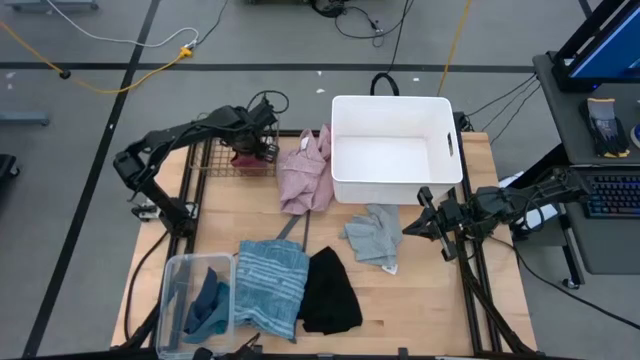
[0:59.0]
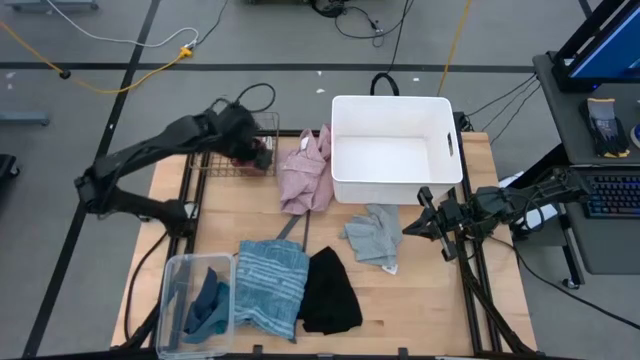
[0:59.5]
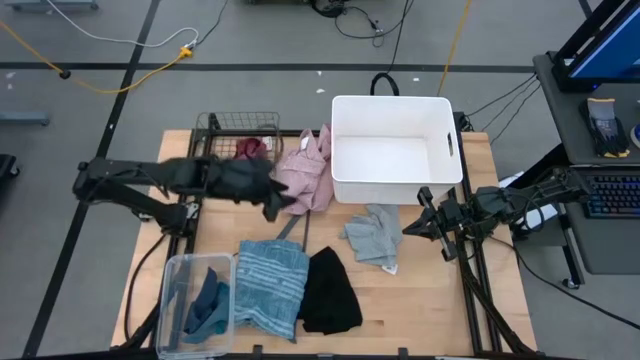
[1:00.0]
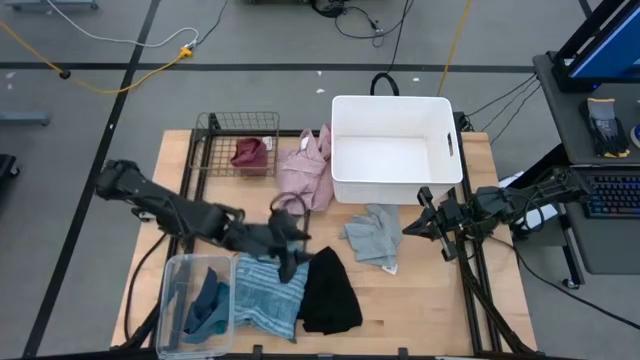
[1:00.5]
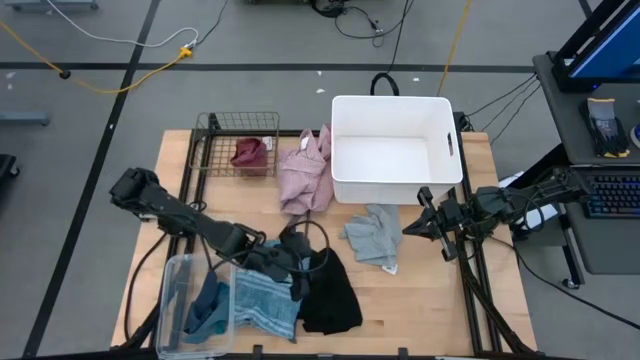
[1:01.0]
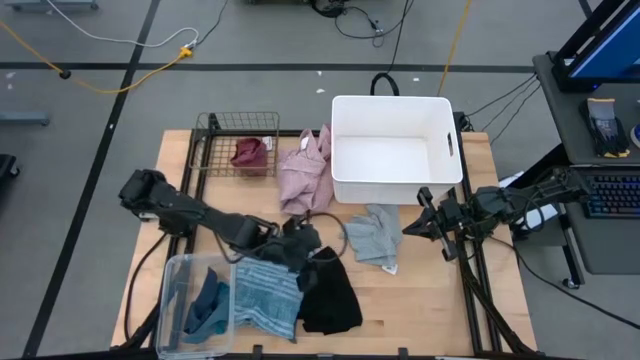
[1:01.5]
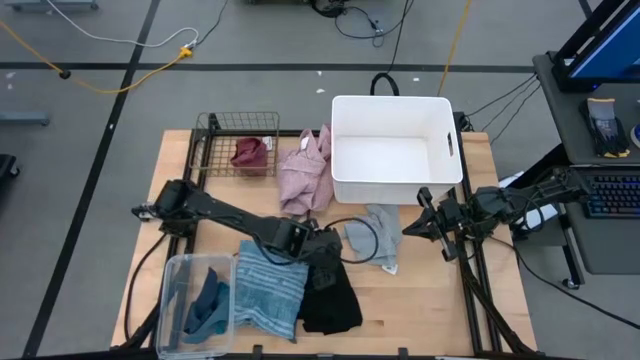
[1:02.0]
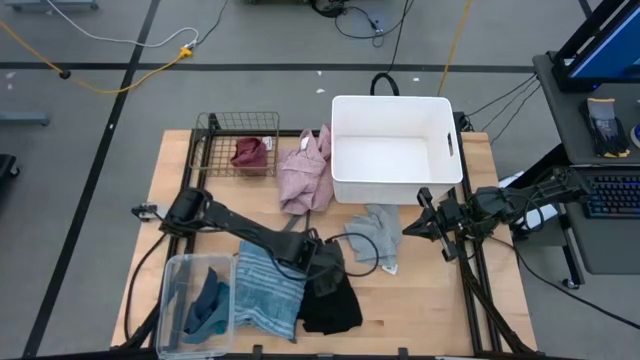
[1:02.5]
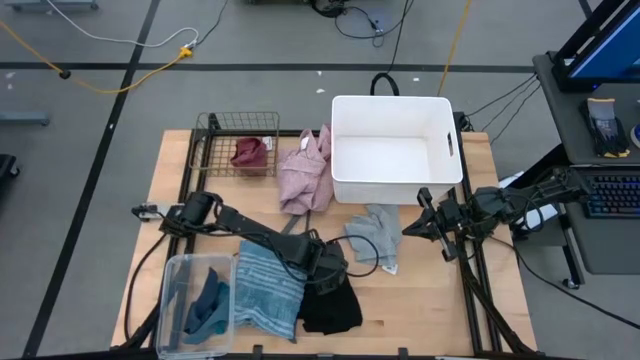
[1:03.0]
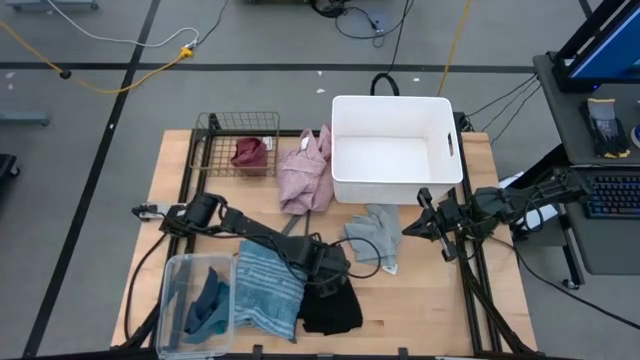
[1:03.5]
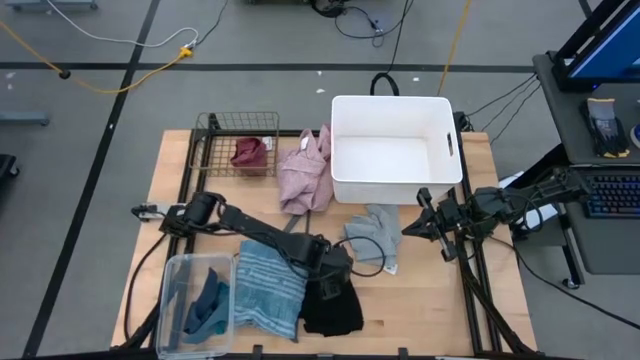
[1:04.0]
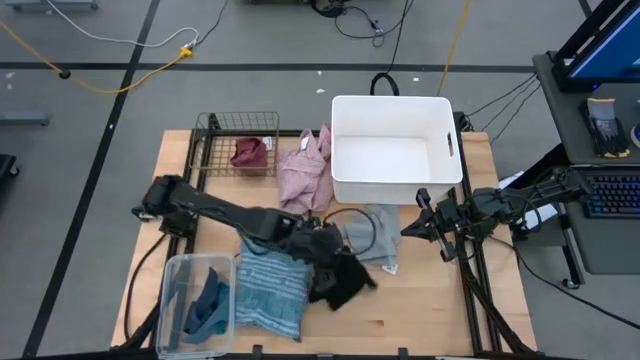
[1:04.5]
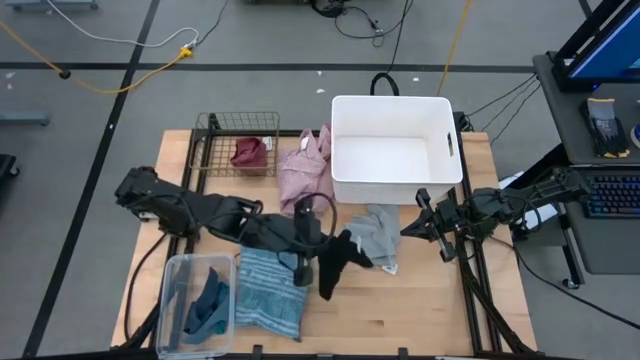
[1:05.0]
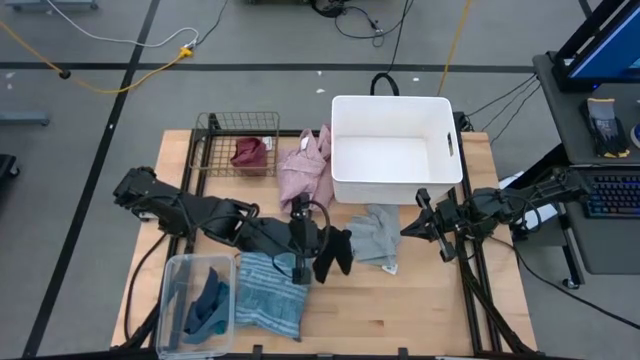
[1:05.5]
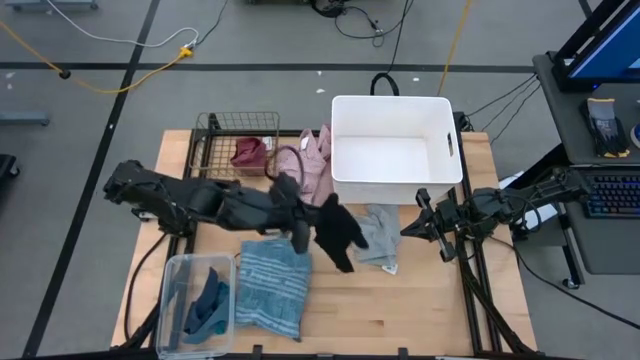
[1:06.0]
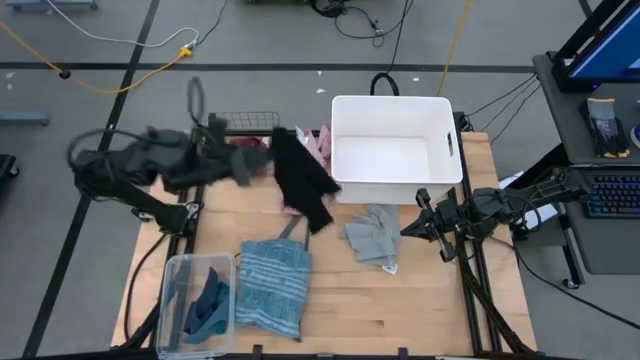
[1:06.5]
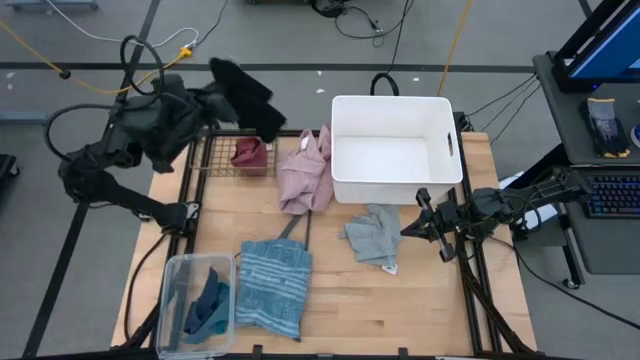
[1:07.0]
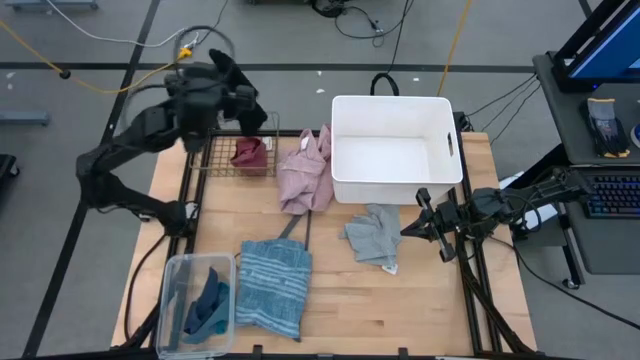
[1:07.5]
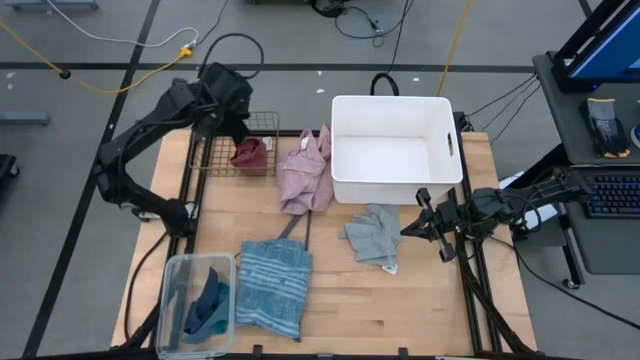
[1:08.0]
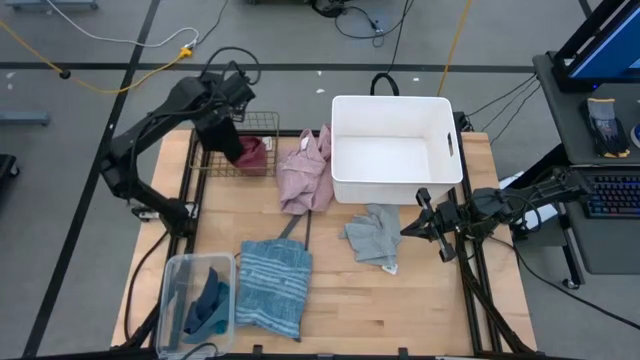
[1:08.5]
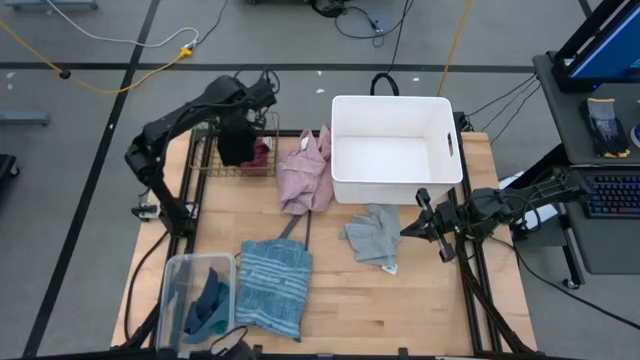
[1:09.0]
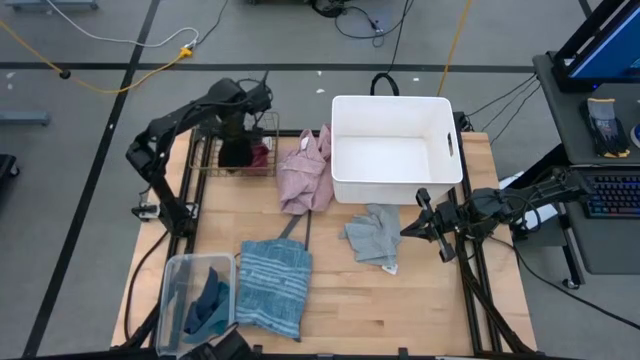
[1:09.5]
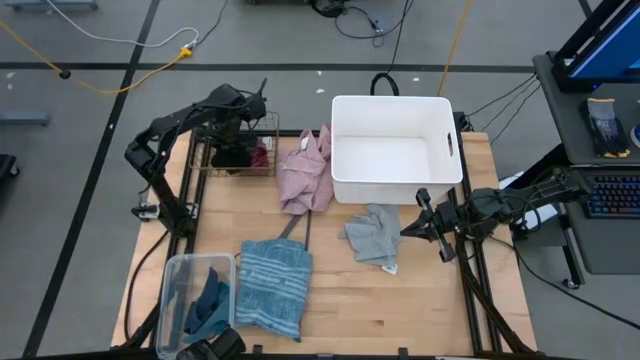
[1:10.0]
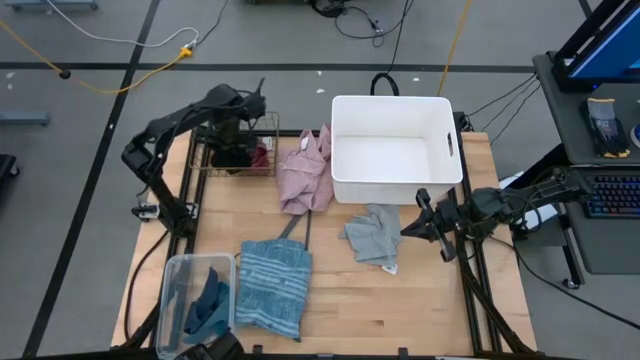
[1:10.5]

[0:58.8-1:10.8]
Task: Pick & Place Cloths
Put the black underwear into the wire basket
